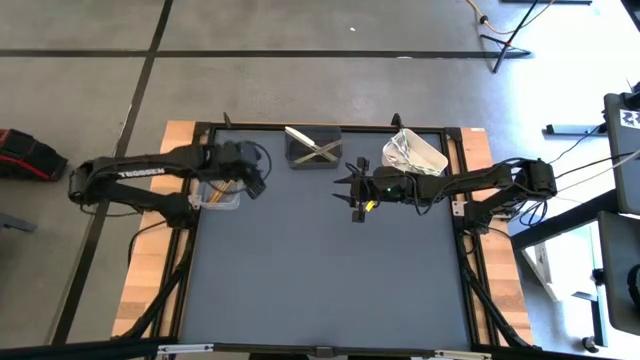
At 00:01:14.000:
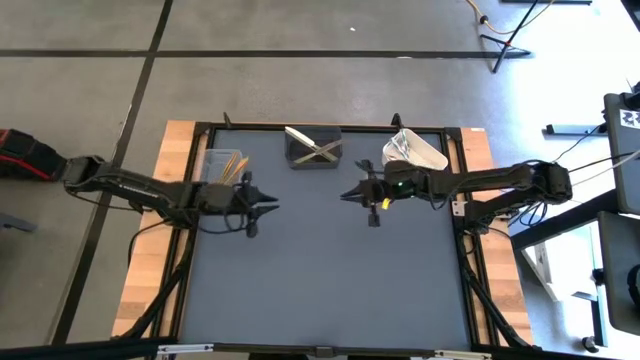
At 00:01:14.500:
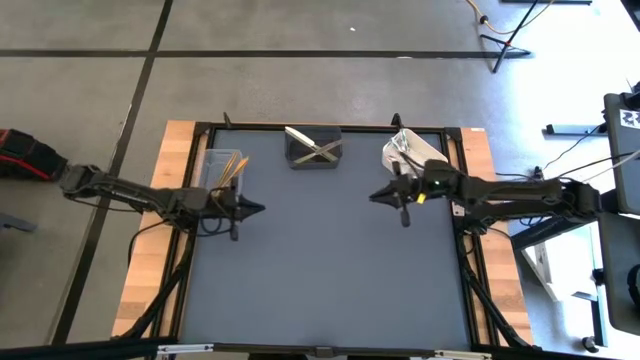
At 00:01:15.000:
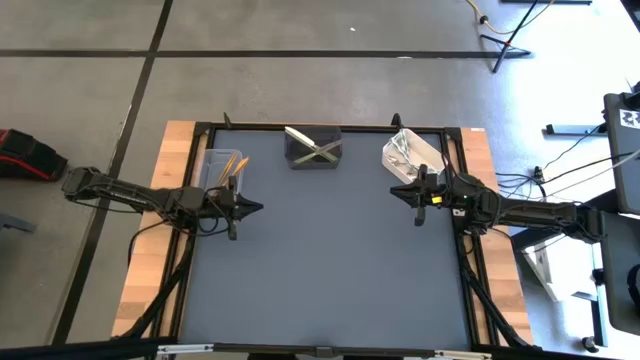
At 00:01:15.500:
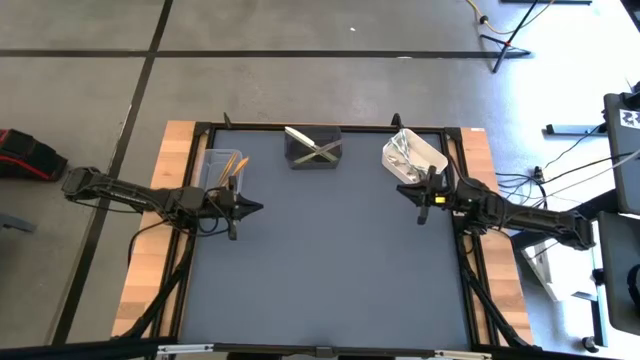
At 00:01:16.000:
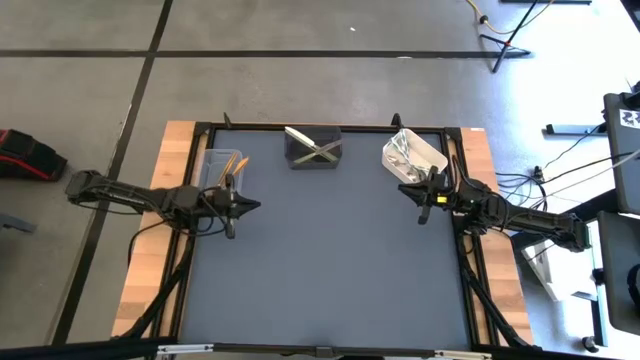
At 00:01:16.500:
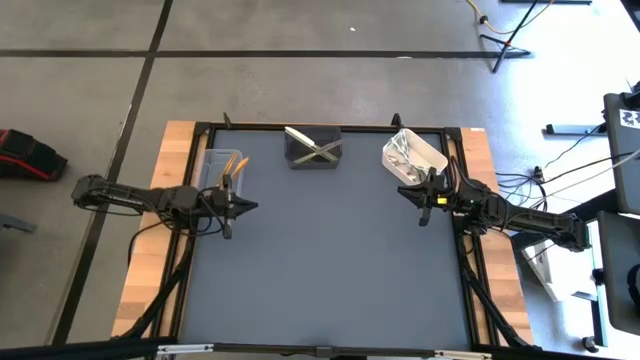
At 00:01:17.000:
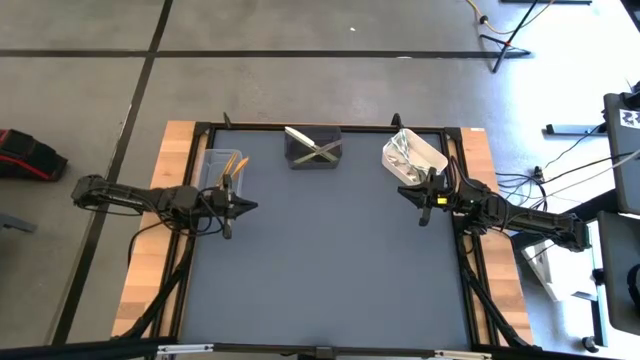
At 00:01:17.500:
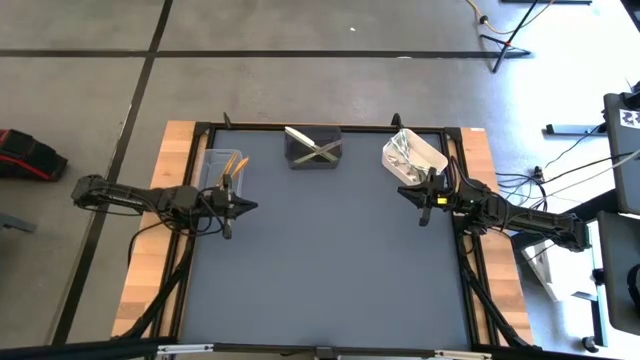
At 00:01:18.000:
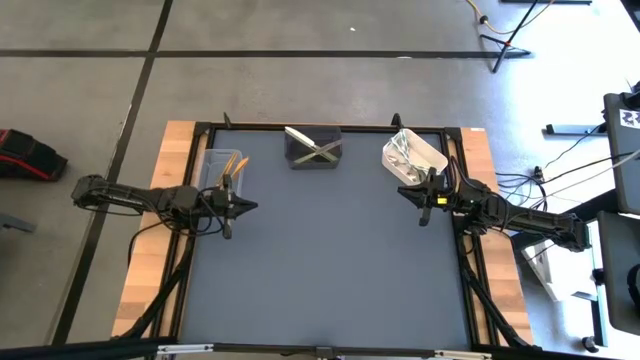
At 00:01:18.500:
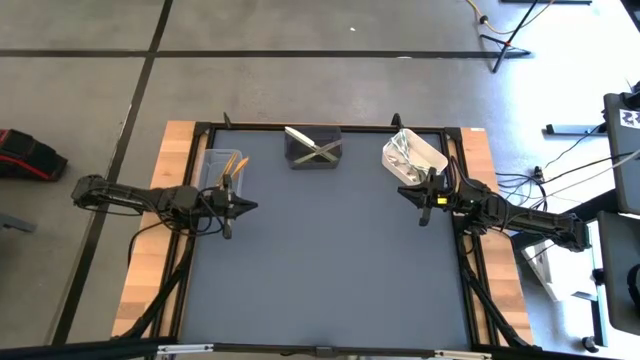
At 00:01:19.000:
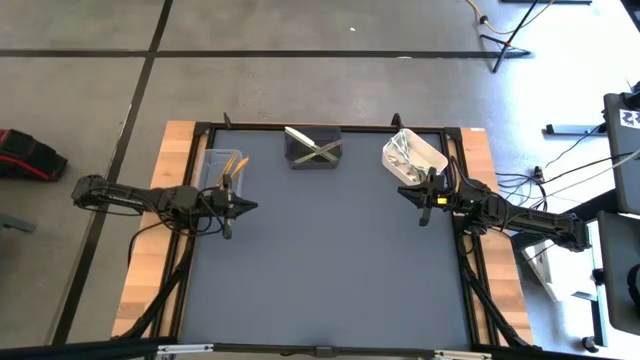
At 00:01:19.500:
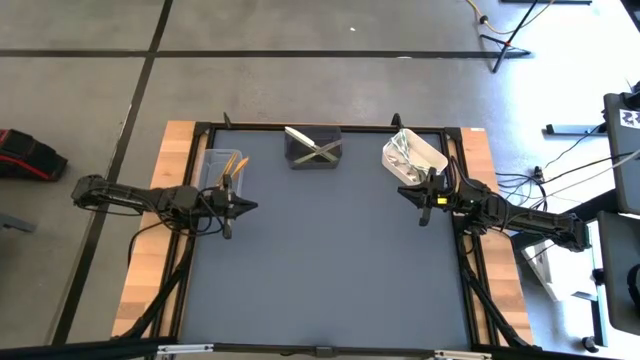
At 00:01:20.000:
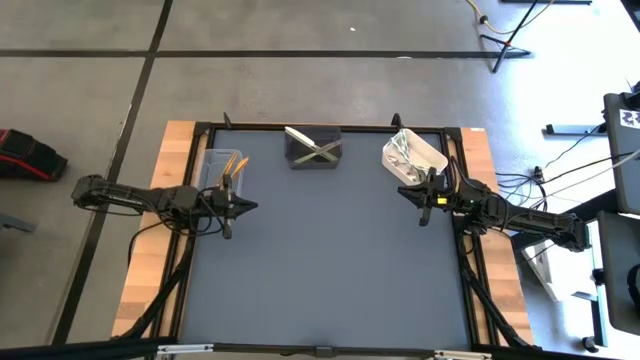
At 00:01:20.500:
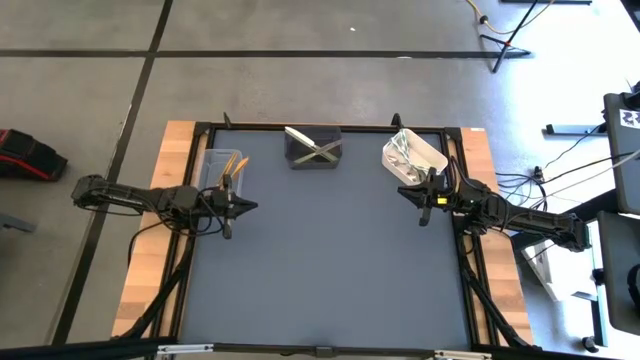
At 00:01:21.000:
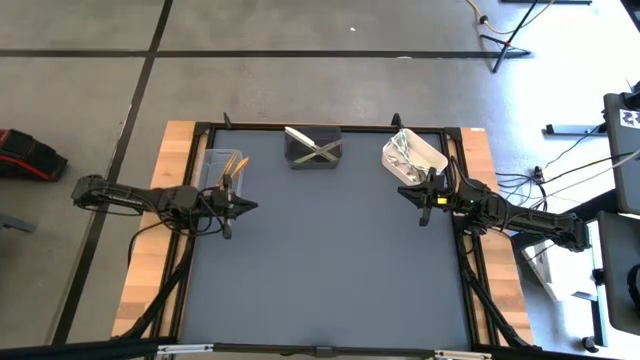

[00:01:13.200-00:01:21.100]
Task: Sort silverware by color (type)
Return to Home Position

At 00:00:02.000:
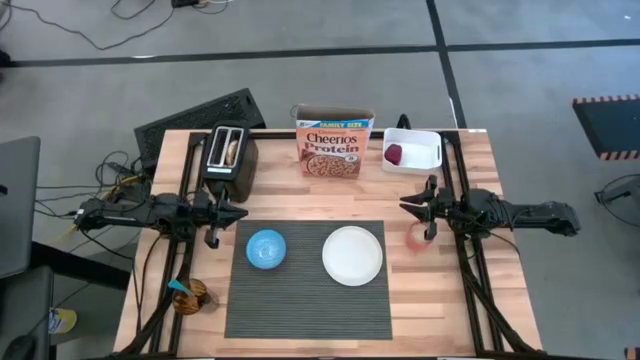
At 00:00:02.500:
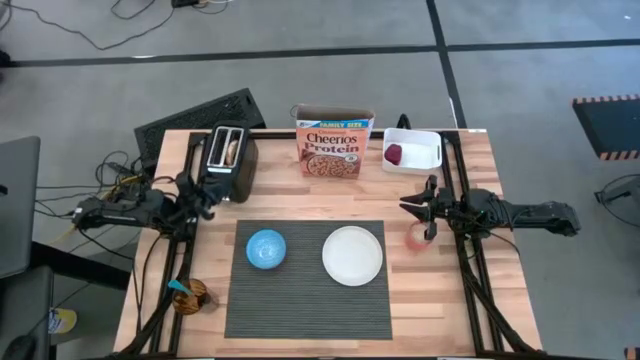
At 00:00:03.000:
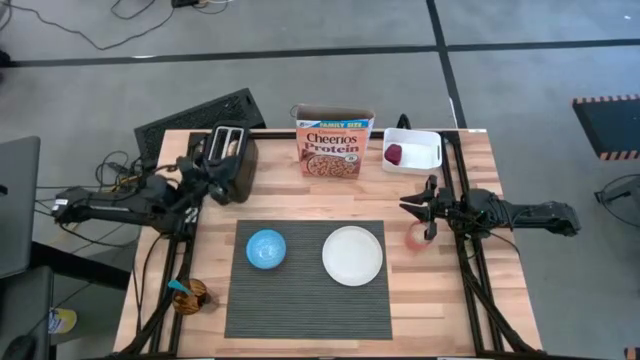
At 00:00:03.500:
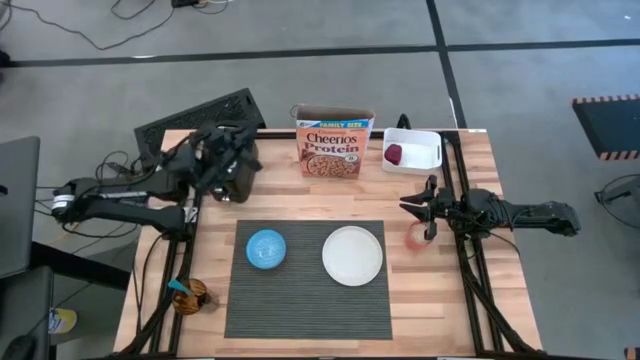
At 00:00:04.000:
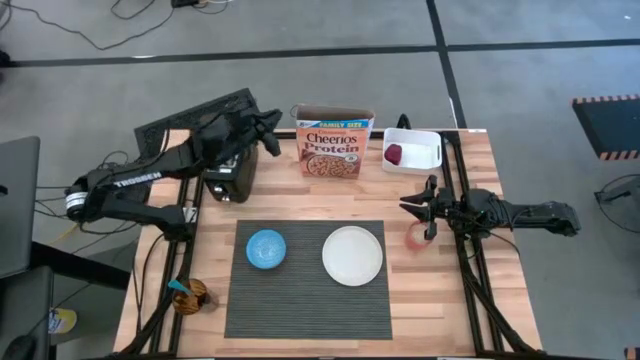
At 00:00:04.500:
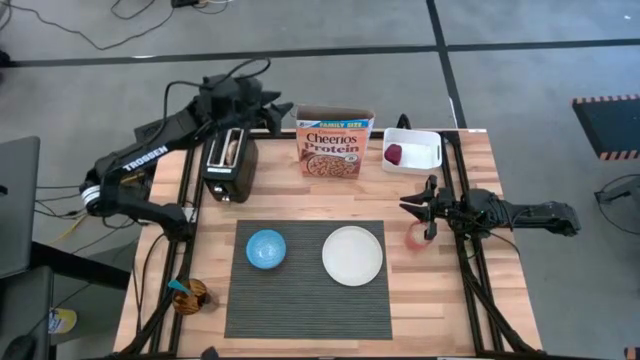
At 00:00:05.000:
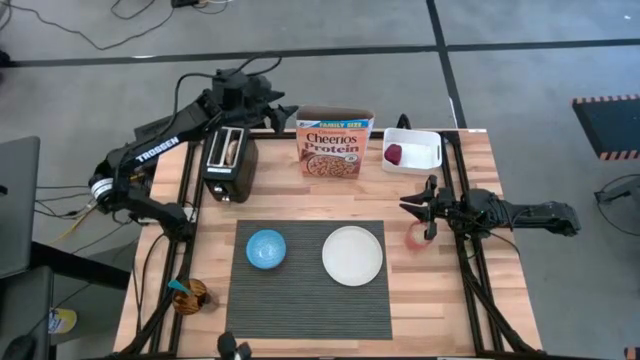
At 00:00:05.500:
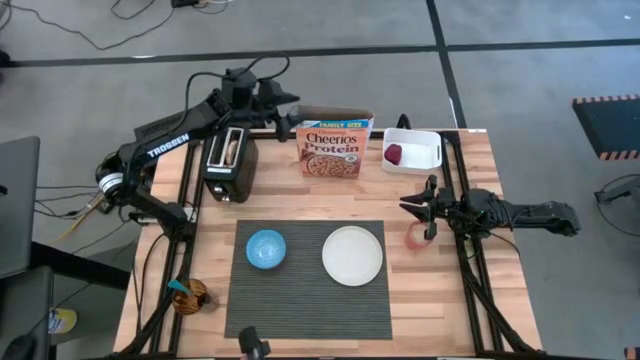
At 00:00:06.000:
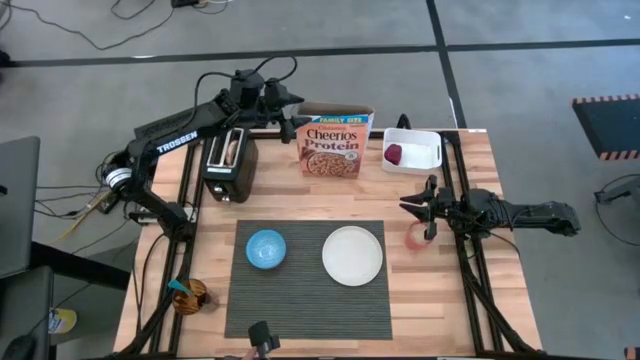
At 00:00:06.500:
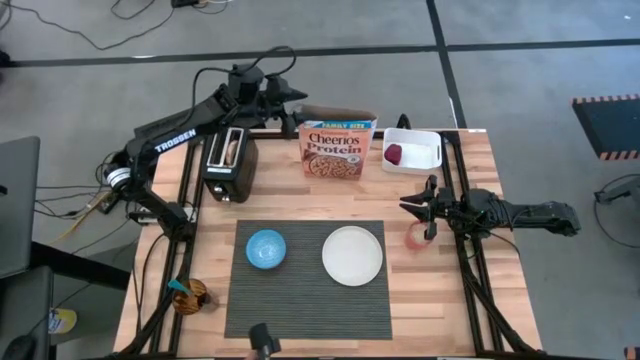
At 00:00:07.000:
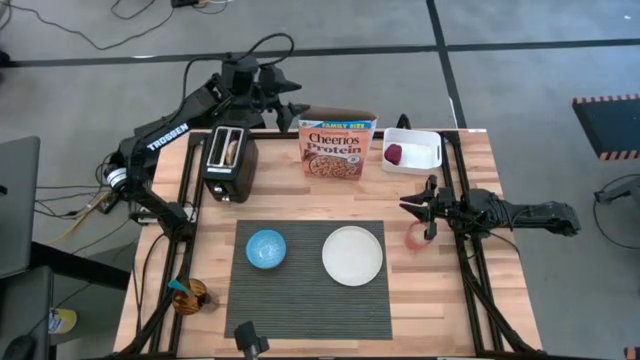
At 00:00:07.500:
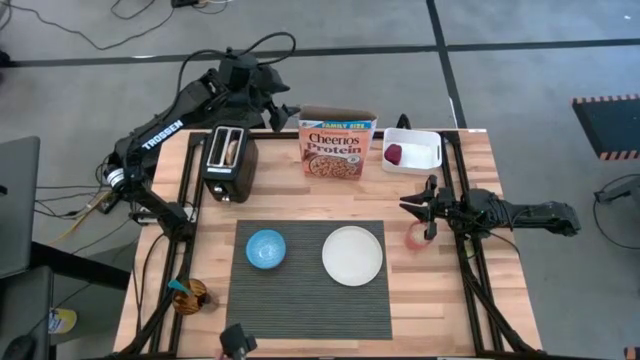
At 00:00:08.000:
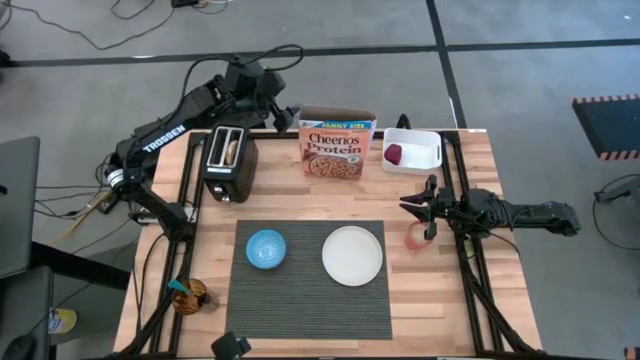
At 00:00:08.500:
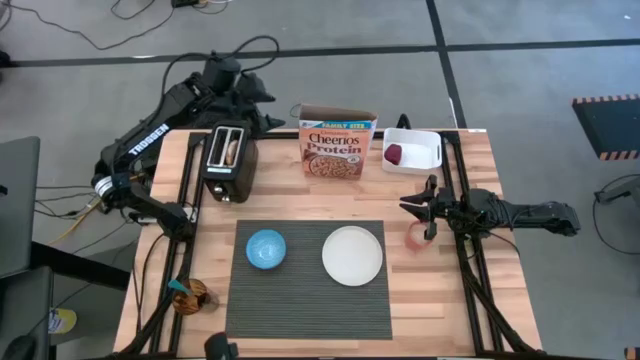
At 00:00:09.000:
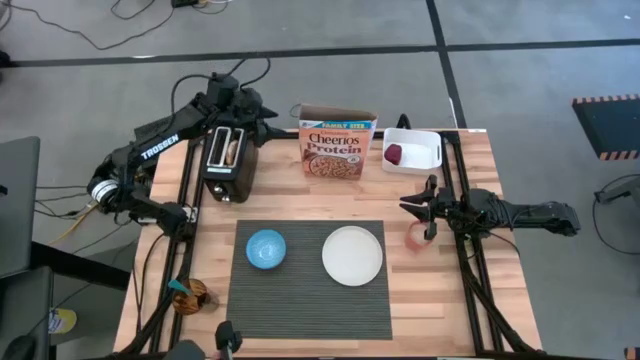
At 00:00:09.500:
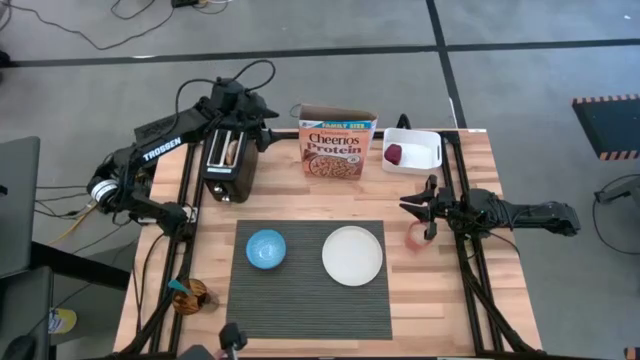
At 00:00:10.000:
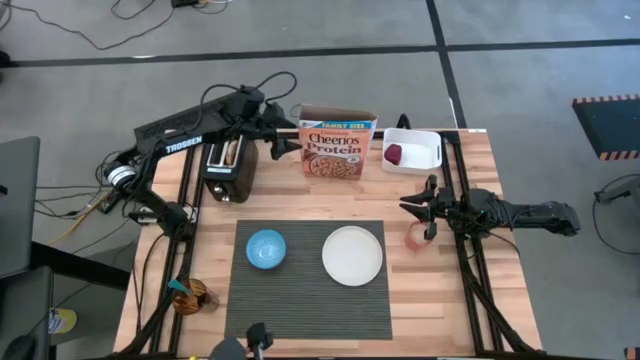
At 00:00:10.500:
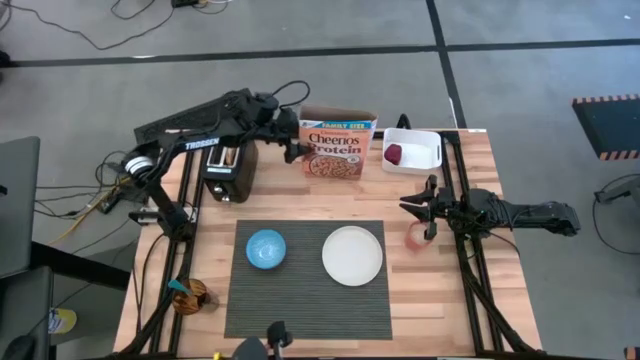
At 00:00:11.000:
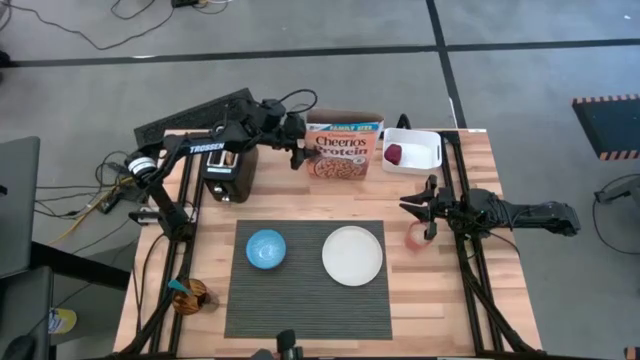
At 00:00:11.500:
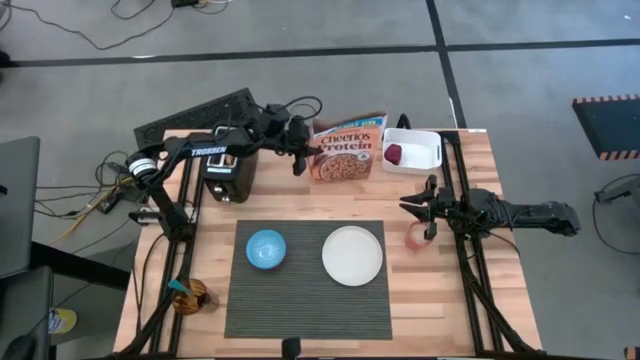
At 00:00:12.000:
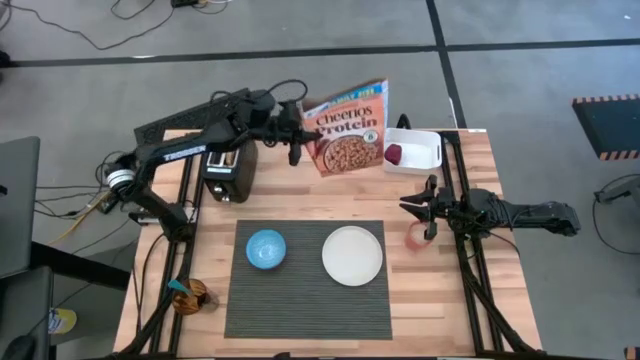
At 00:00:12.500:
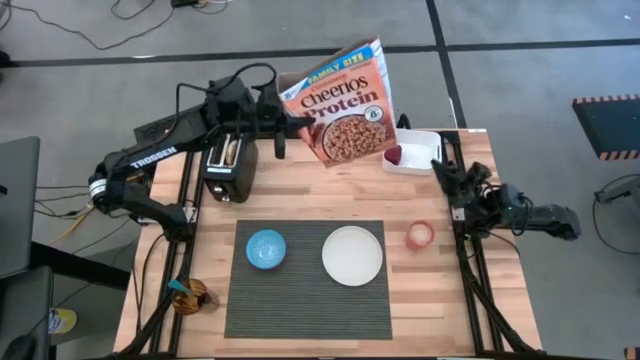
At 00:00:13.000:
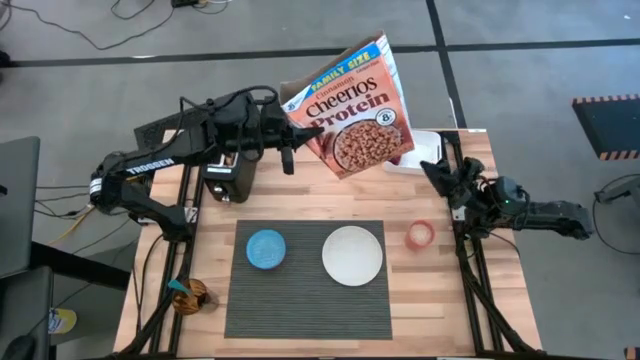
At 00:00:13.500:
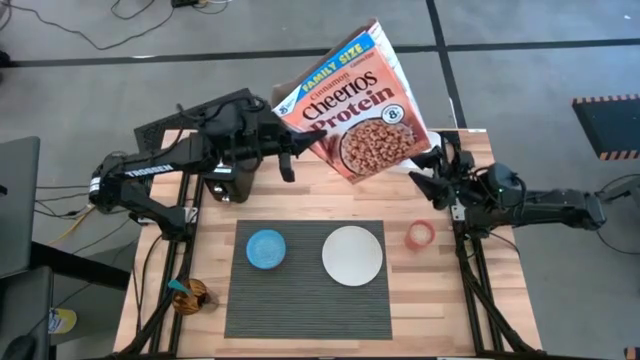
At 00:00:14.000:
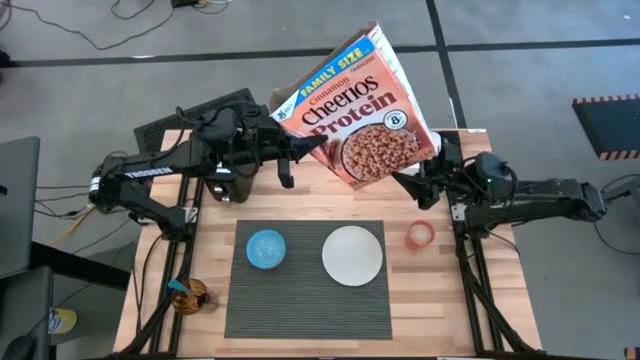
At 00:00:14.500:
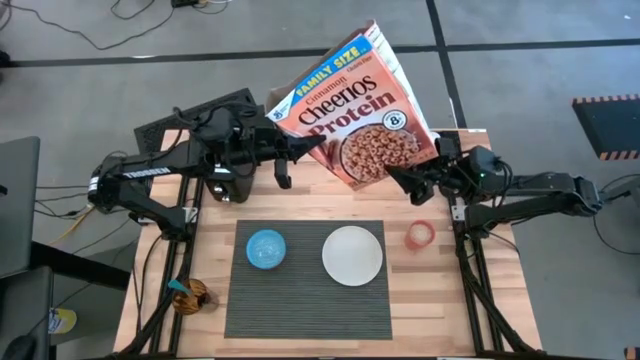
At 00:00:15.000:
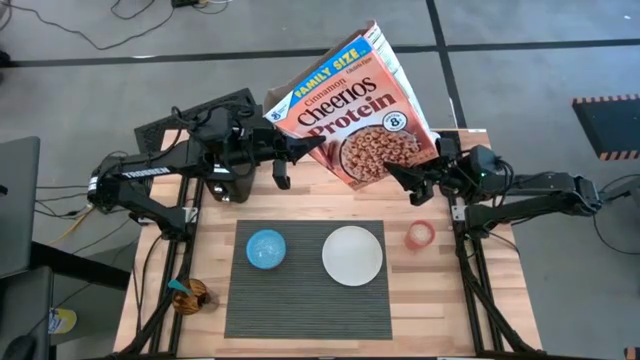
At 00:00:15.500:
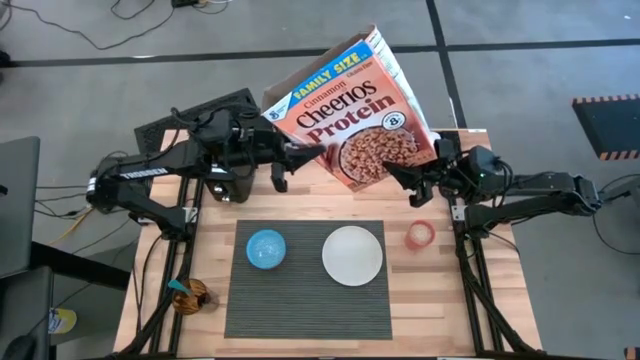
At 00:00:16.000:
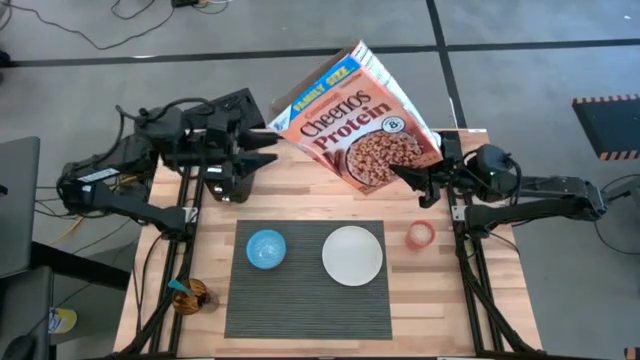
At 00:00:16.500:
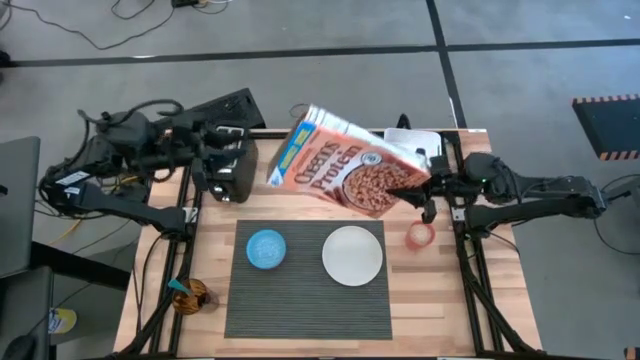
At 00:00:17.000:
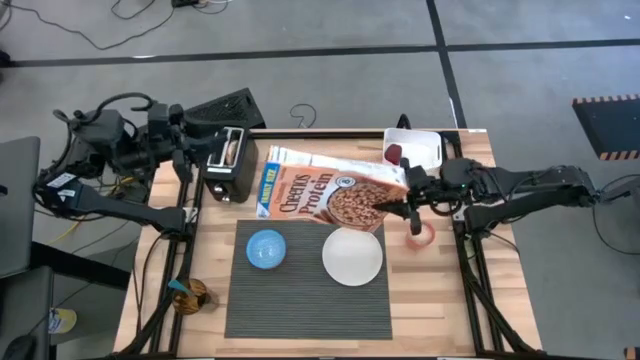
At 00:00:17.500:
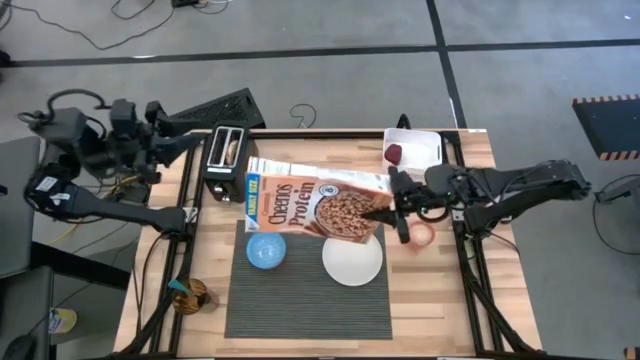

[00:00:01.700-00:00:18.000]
Task: Arrange a breakfast setting
Pour the cereal into the blue bowl
